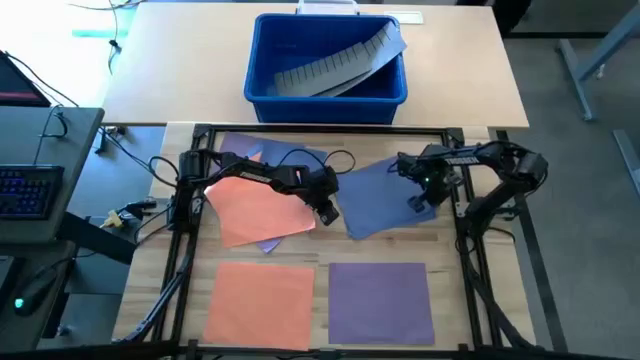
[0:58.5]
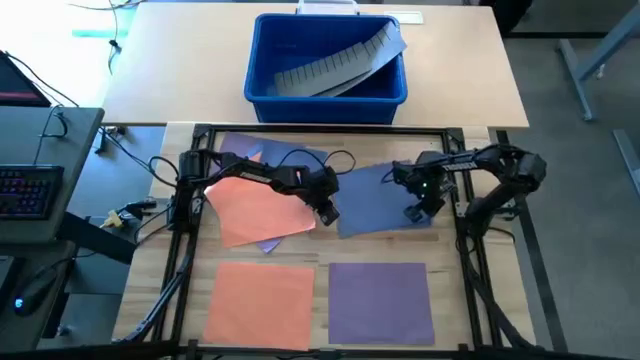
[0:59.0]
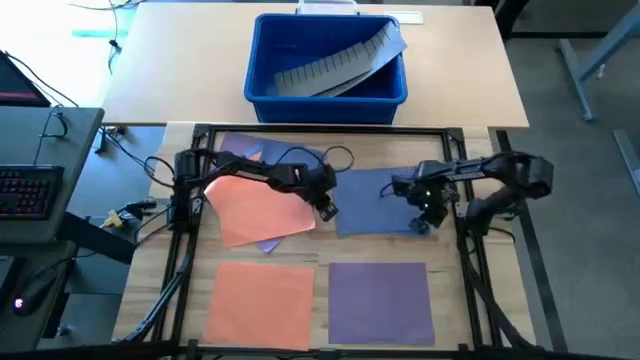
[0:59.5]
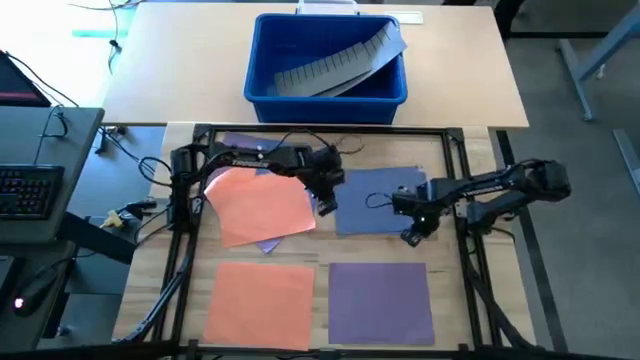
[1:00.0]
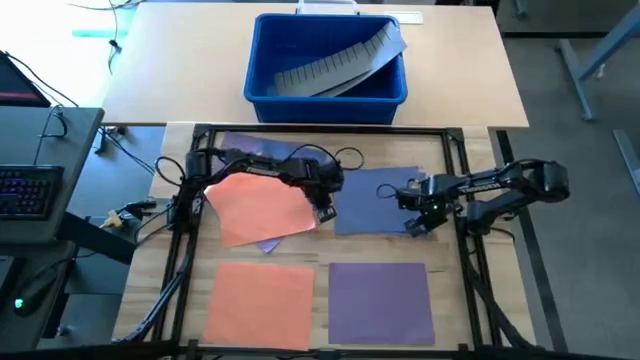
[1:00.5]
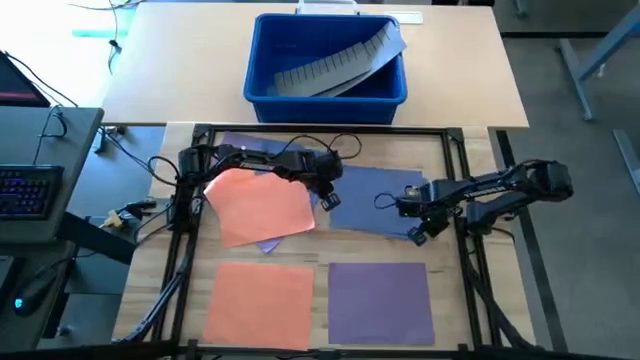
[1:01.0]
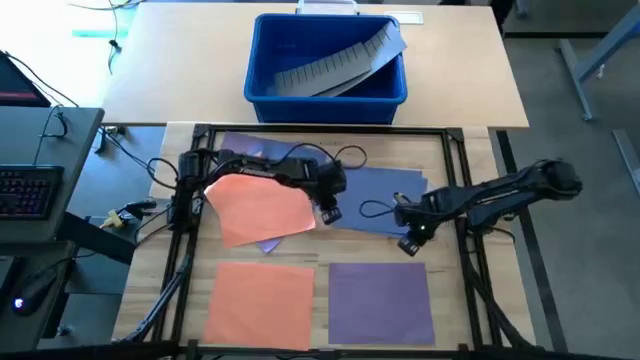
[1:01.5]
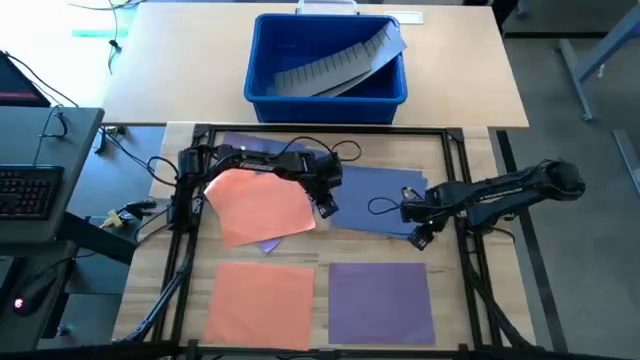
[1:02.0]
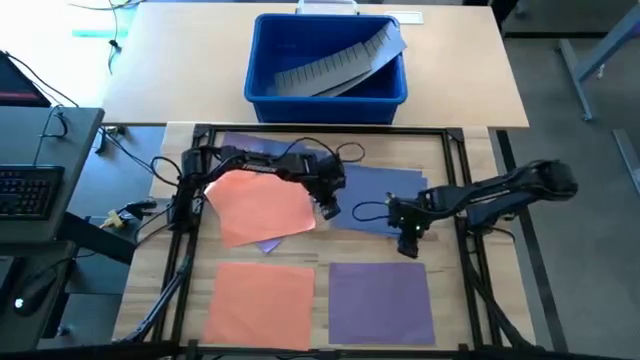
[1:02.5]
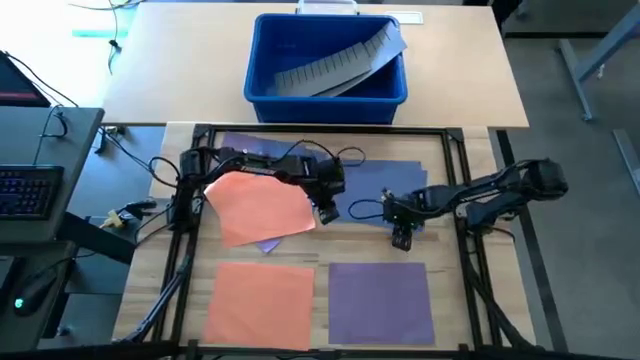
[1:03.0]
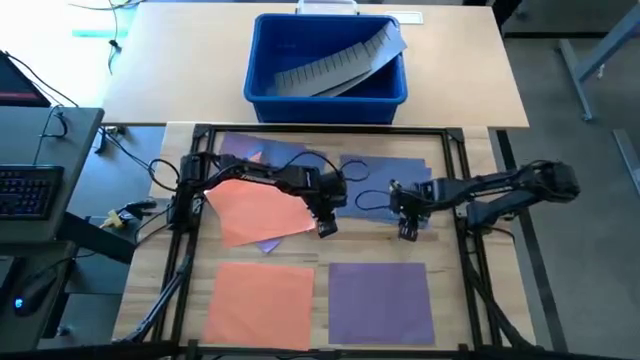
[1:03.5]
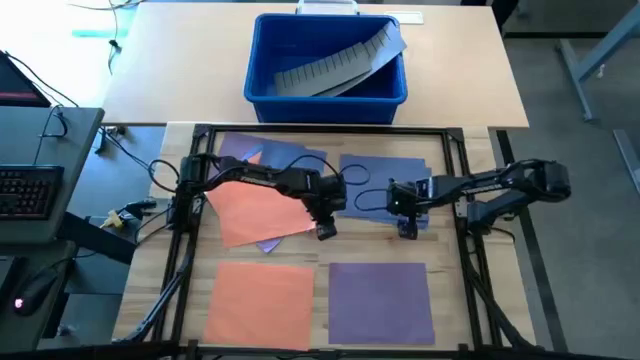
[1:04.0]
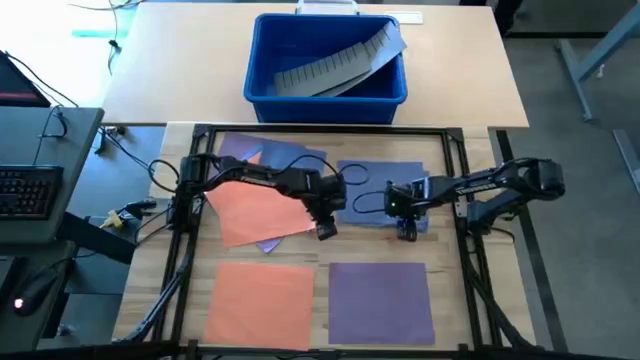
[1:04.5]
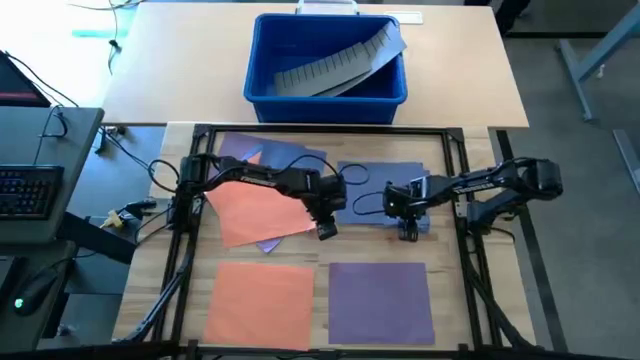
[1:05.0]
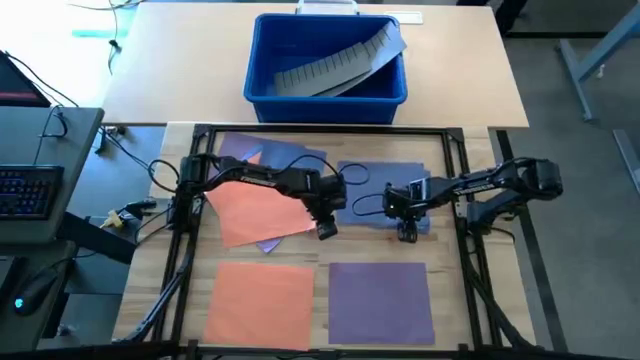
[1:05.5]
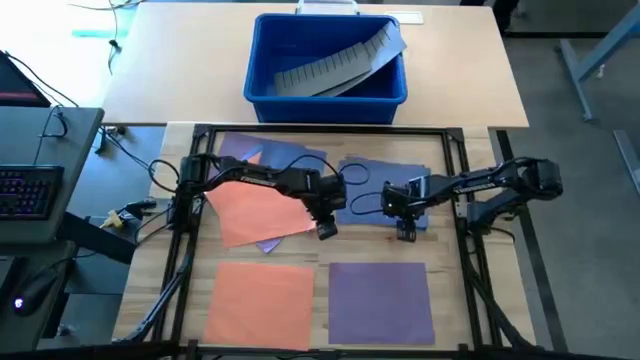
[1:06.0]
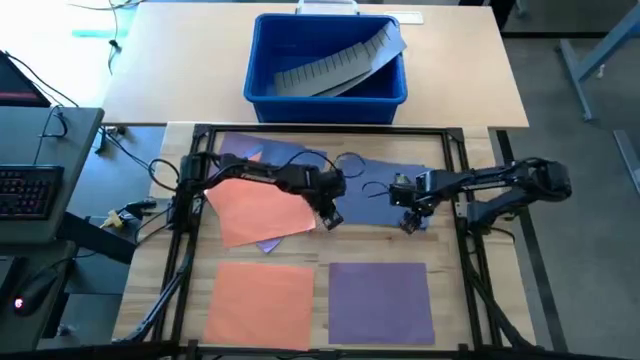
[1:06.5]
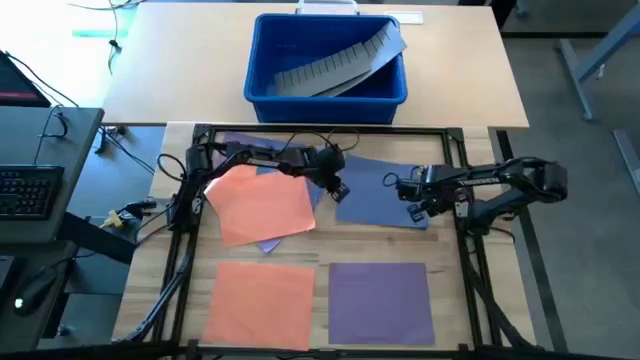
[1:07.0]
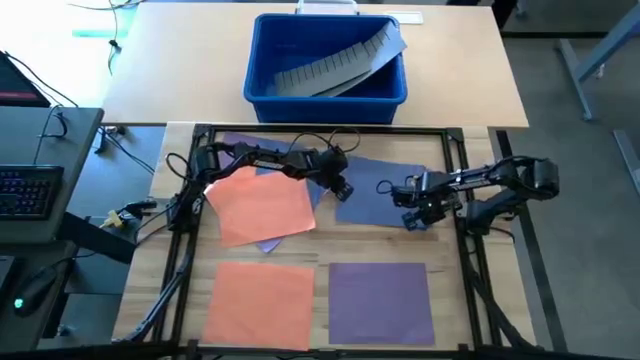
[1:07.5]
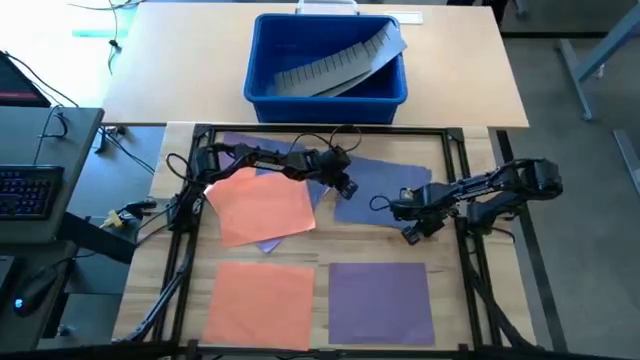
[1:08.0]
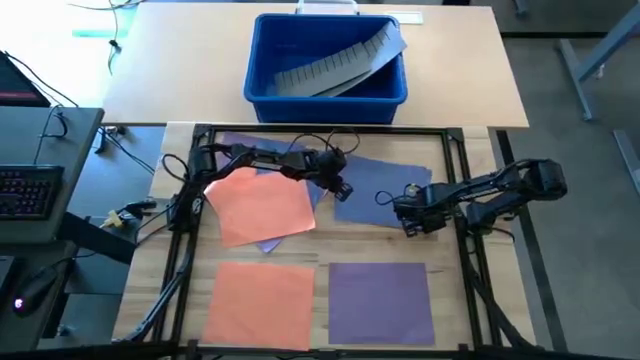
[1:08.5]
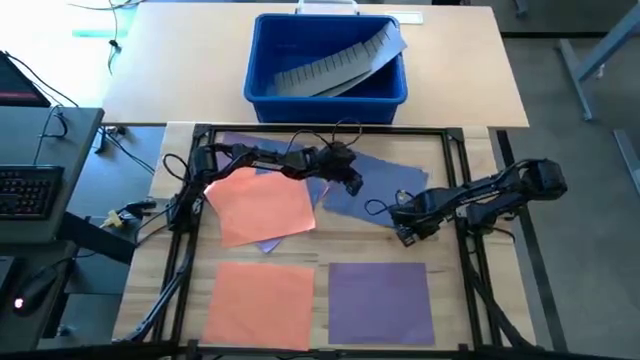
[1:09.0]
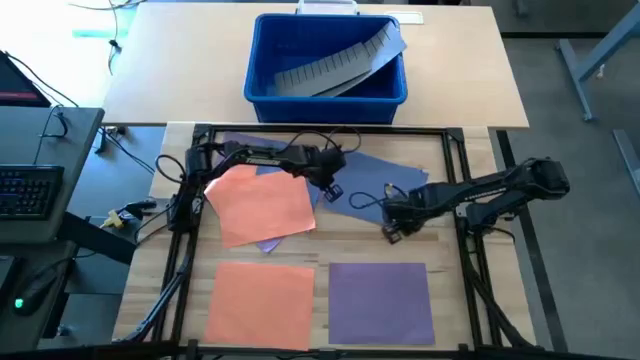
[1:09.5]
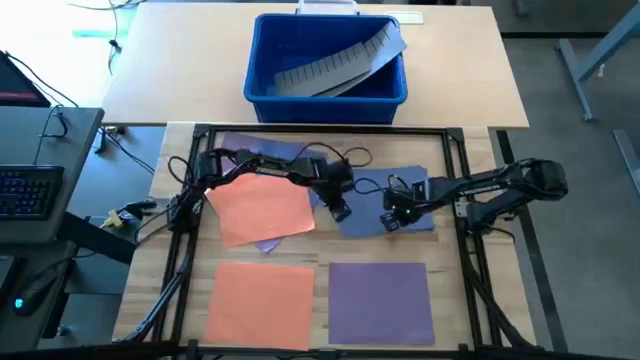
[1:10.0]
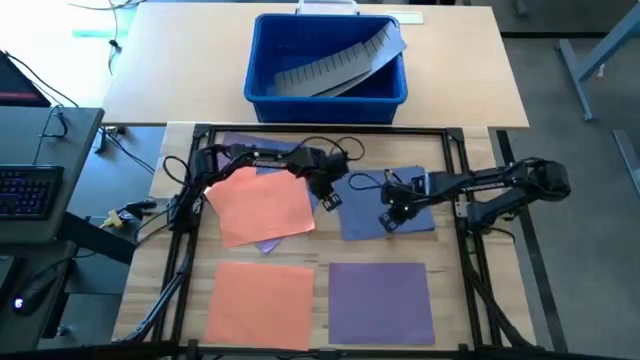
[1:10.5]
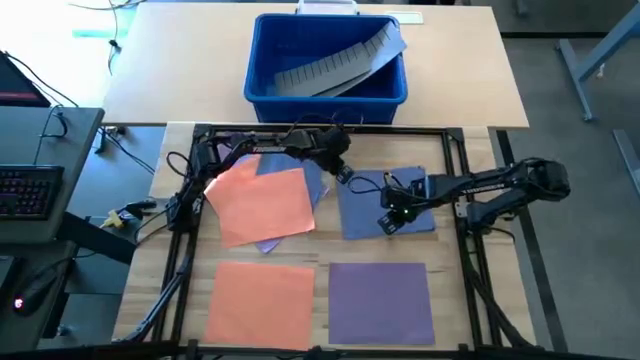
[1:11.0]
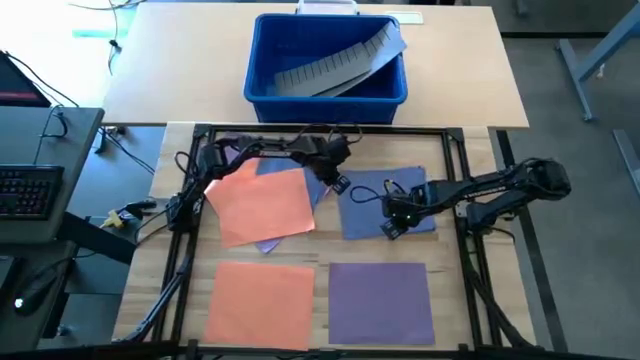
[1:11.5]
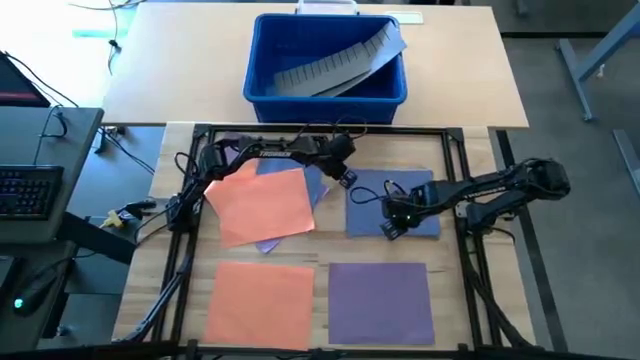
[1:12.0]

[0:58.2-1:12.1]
Task: Organize paper
Stack the blue paper on top of the blue paper

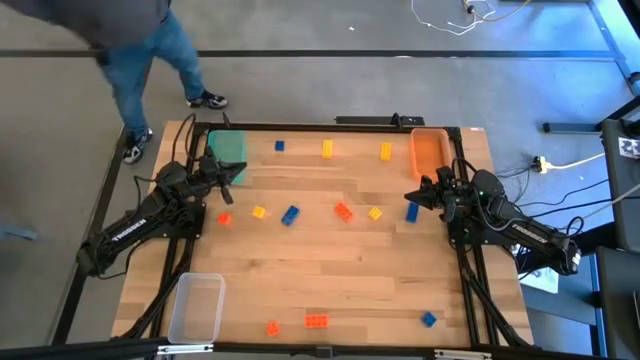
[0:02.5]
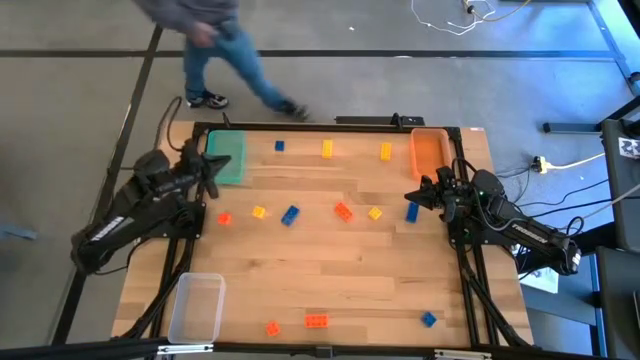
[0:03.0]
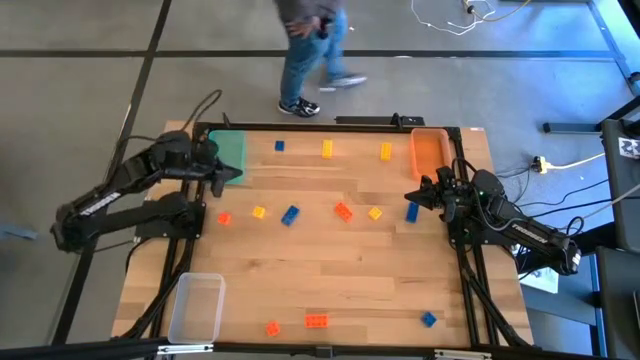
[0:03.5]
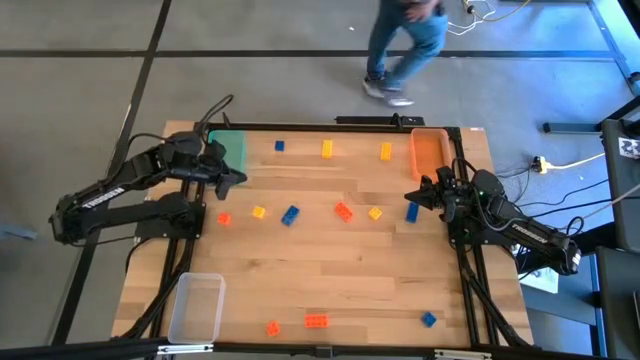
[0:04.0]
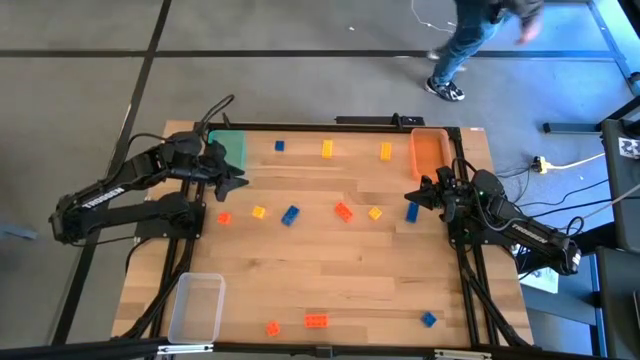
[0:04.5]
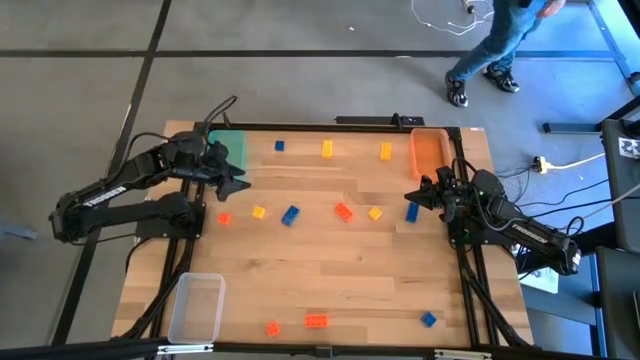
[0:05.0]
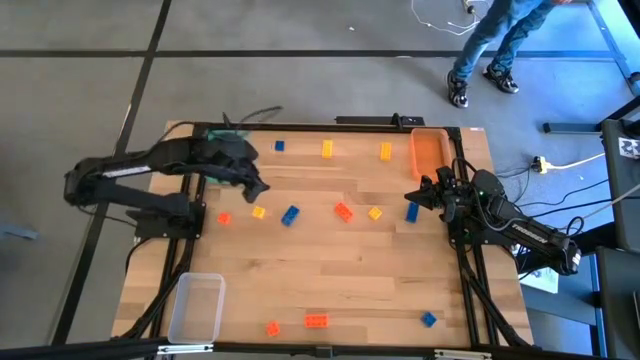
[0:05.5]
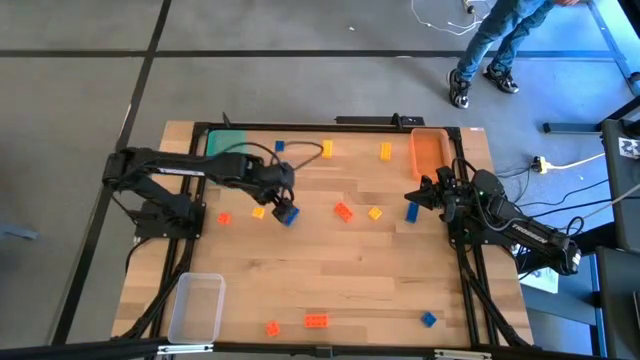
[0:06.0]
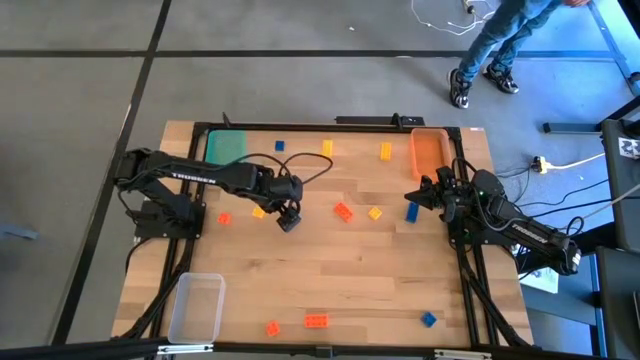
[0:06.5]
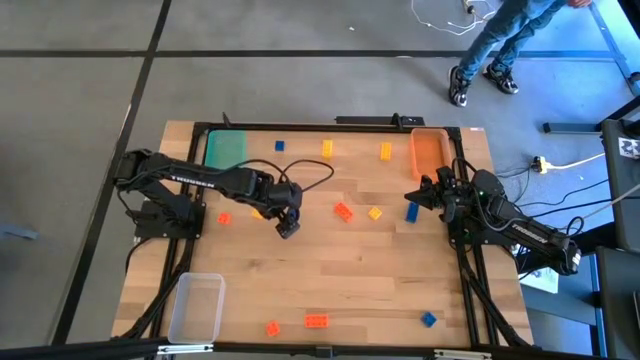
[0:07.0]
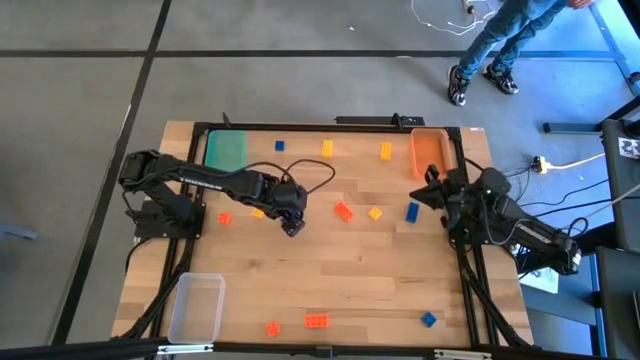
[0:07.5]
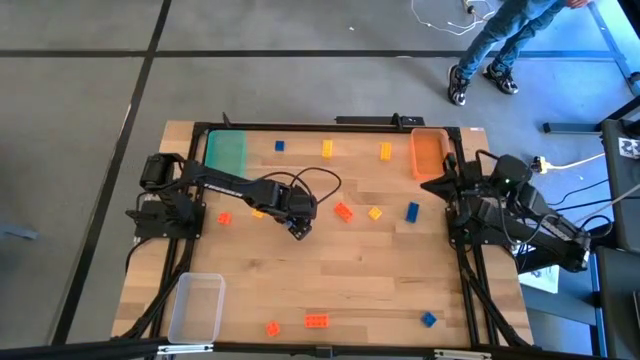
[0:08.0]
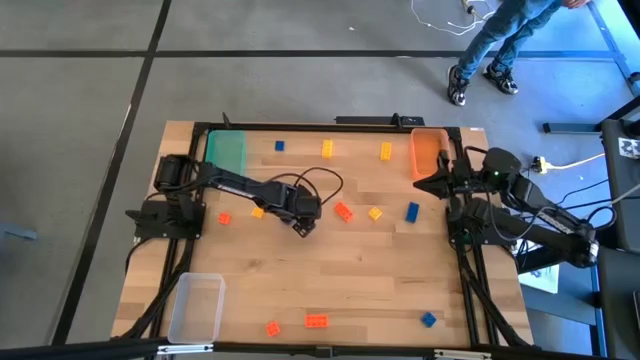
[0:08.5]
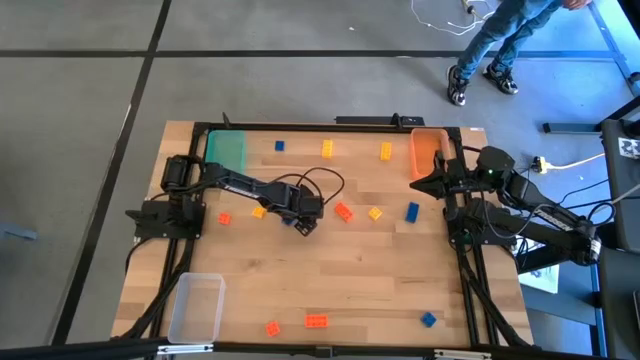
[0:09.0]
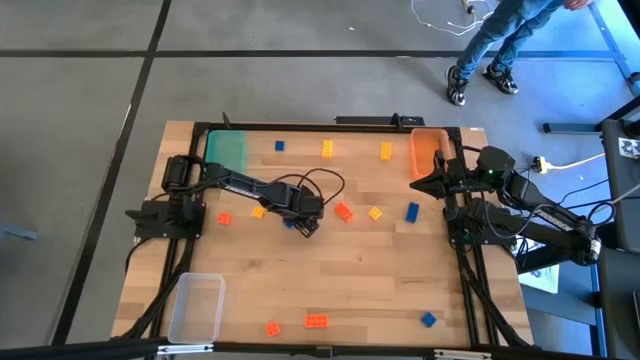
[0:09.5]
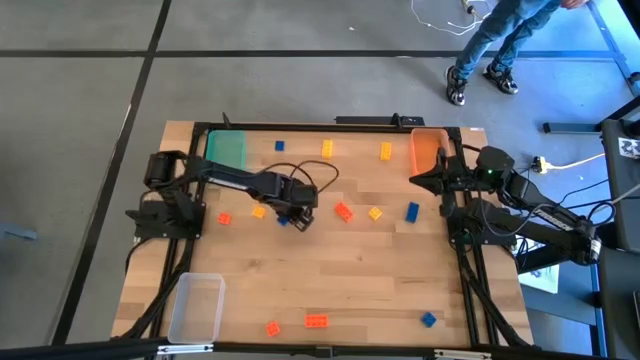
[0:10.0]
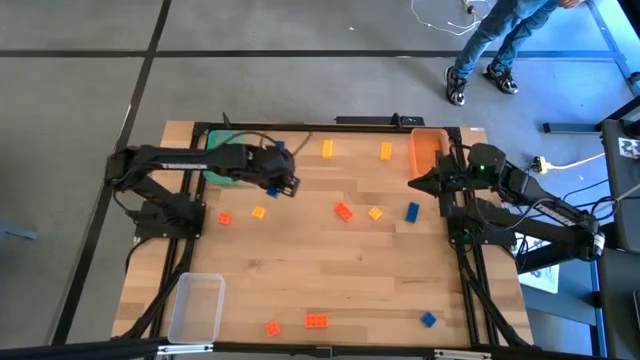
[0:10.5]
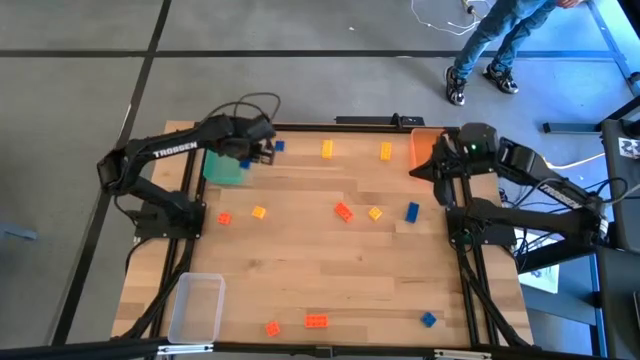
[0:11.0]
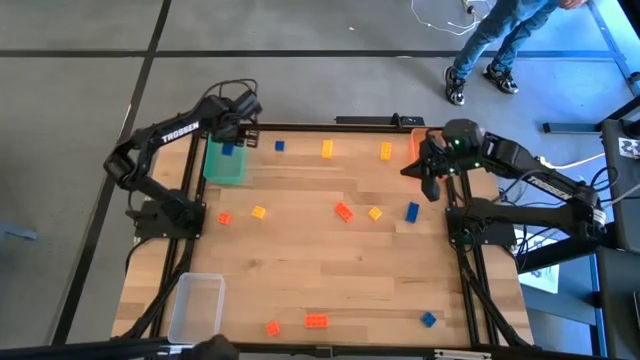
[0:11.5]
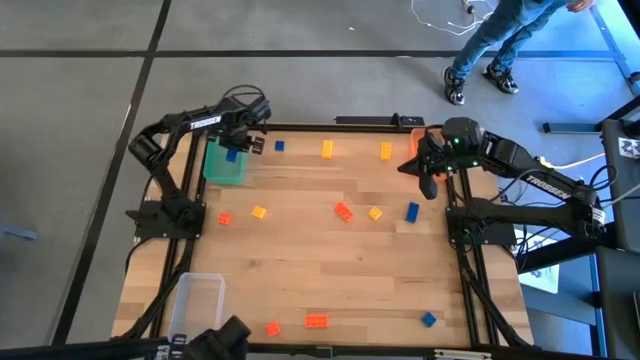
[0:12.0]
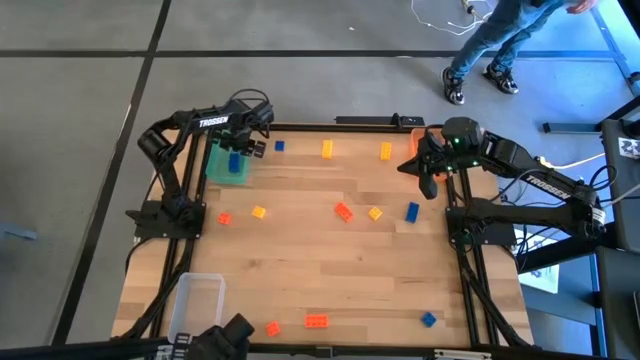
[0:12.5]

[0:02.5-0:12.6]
Task: Sort & place blocks by color
Put the blue game piece into the blue bin
